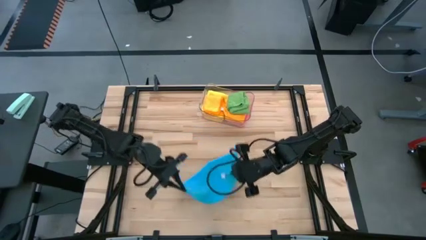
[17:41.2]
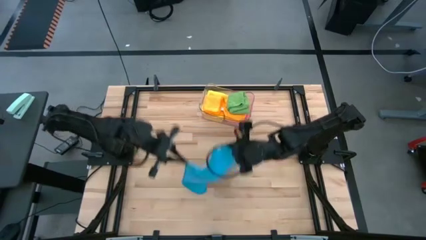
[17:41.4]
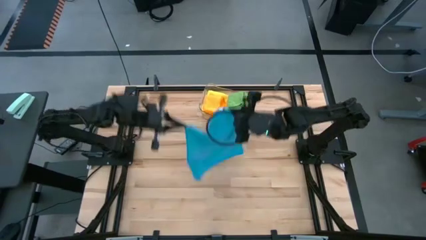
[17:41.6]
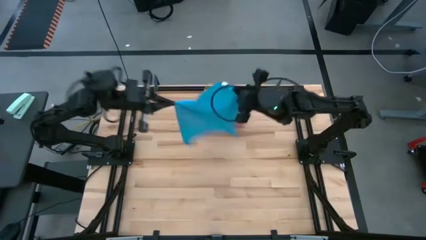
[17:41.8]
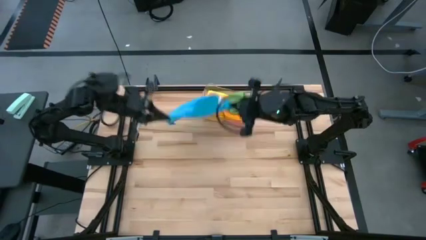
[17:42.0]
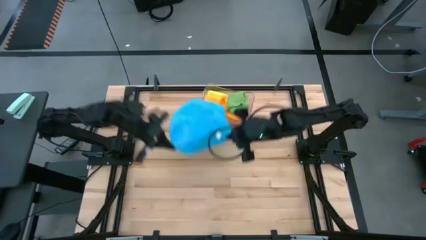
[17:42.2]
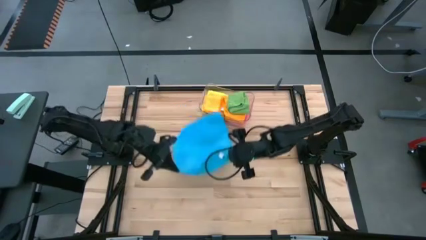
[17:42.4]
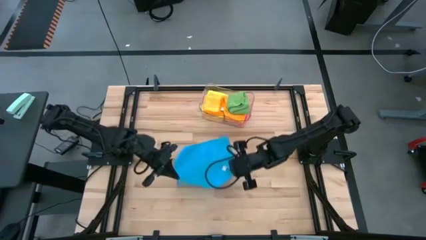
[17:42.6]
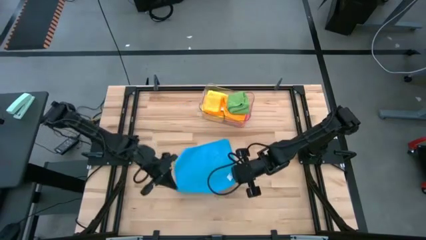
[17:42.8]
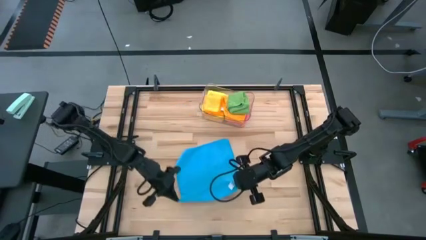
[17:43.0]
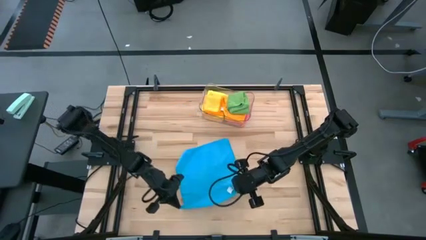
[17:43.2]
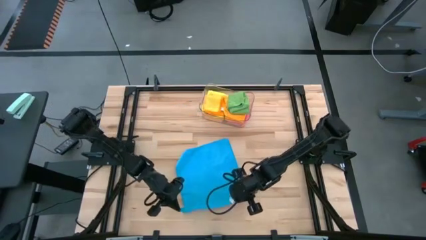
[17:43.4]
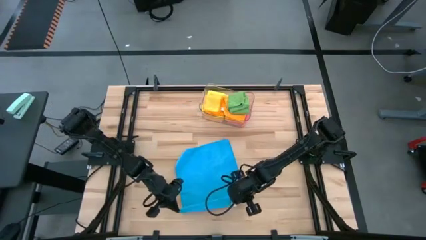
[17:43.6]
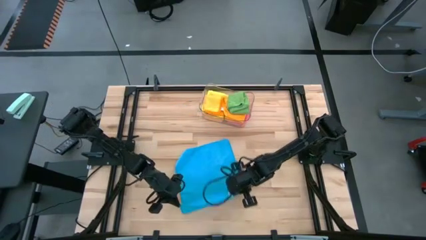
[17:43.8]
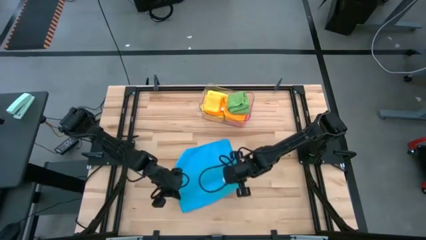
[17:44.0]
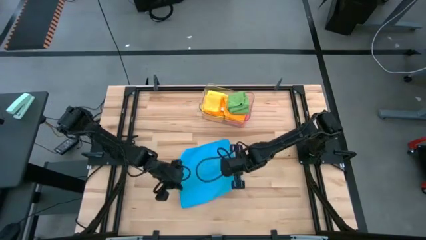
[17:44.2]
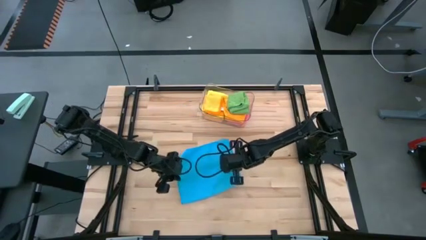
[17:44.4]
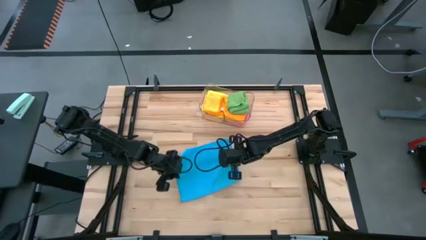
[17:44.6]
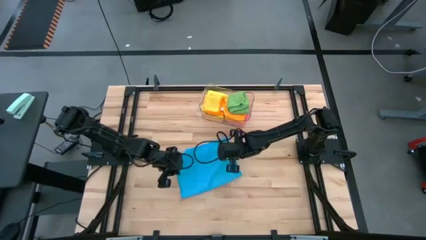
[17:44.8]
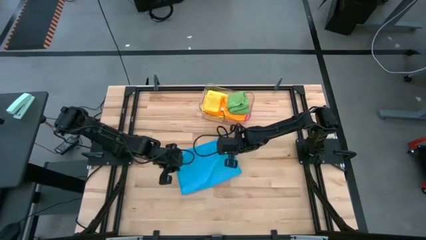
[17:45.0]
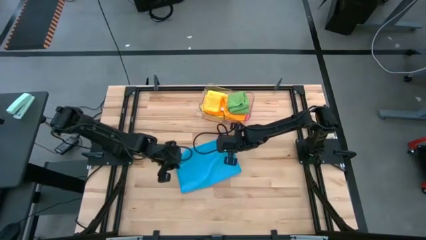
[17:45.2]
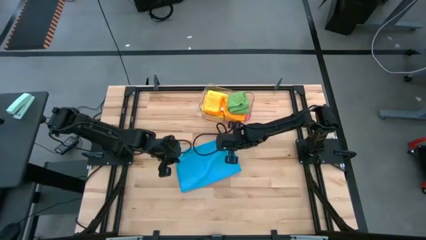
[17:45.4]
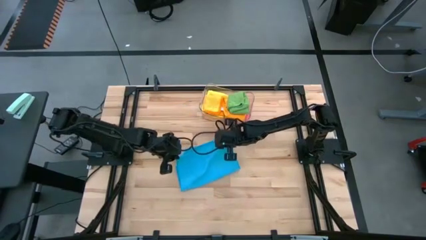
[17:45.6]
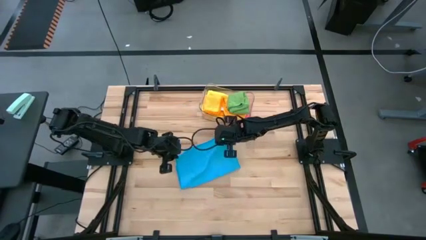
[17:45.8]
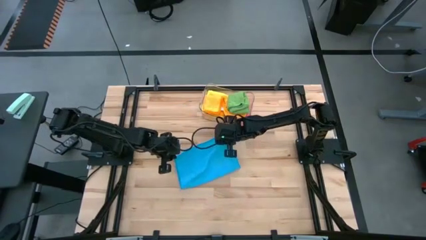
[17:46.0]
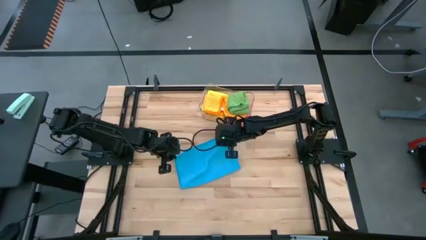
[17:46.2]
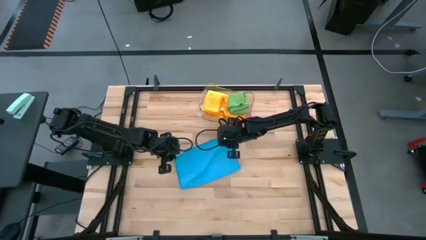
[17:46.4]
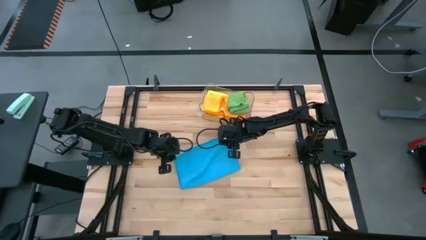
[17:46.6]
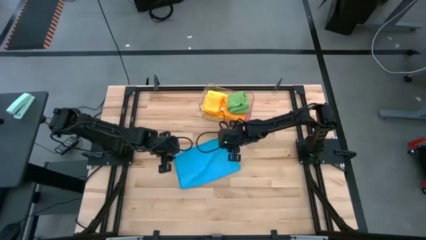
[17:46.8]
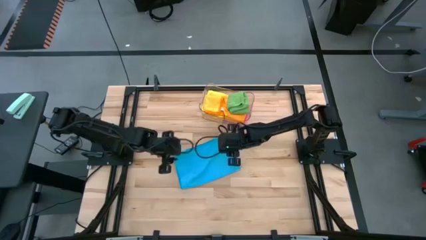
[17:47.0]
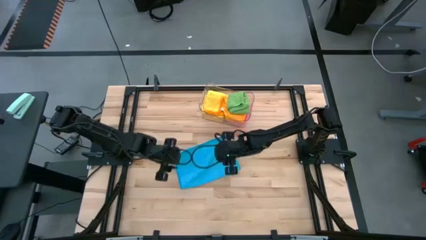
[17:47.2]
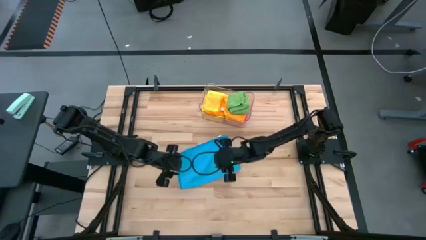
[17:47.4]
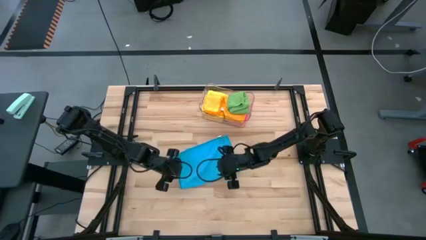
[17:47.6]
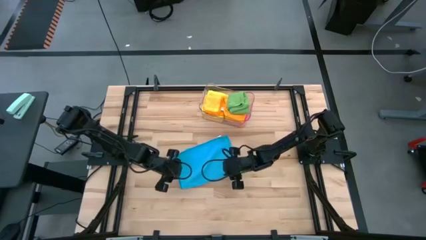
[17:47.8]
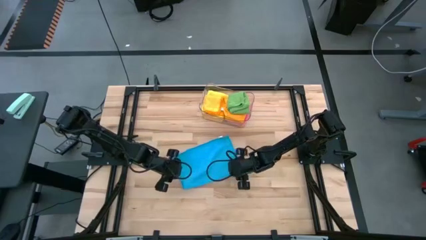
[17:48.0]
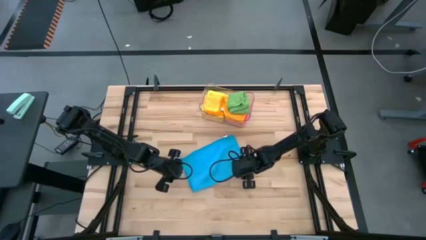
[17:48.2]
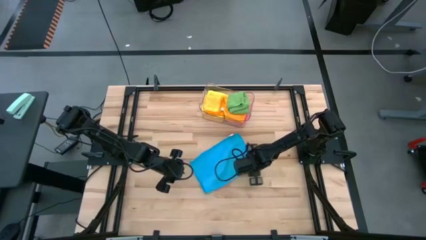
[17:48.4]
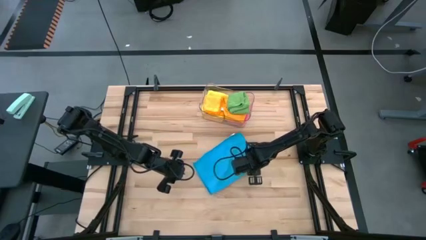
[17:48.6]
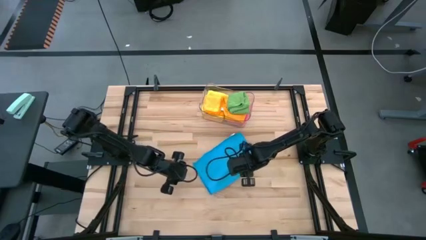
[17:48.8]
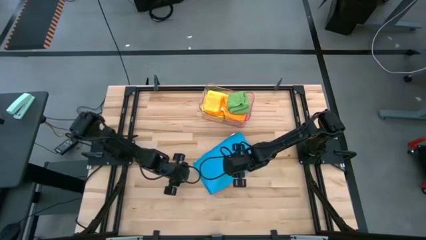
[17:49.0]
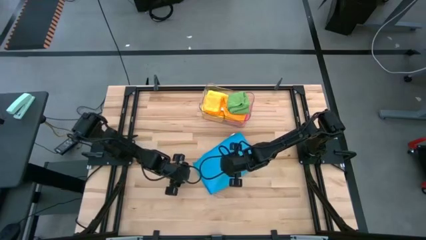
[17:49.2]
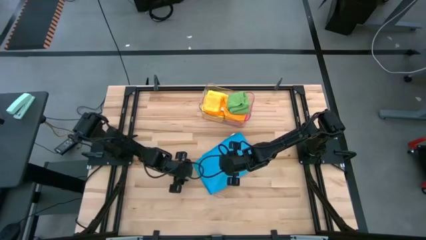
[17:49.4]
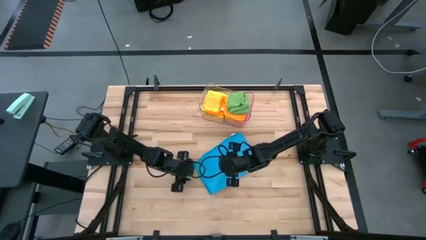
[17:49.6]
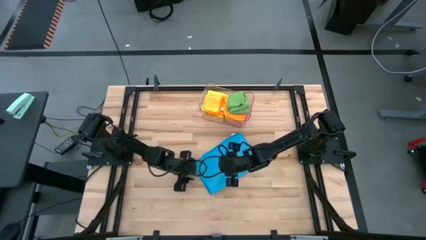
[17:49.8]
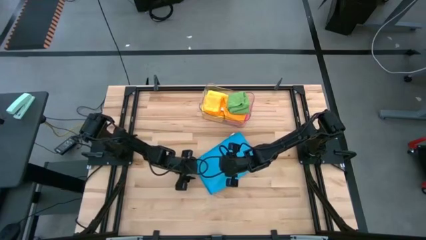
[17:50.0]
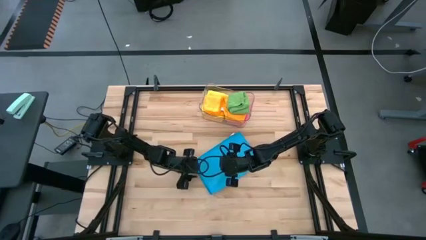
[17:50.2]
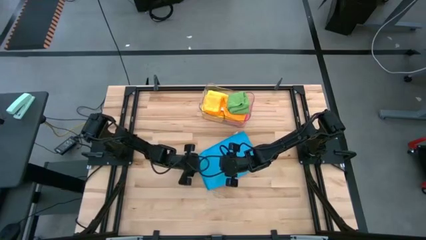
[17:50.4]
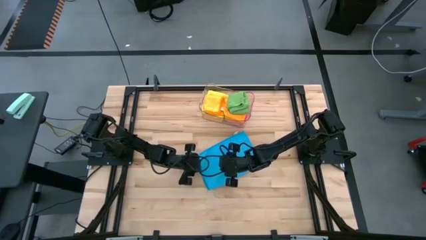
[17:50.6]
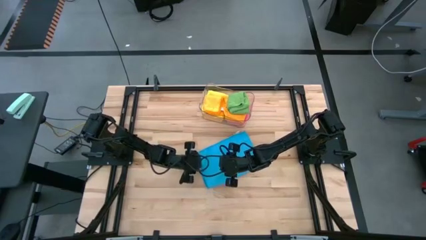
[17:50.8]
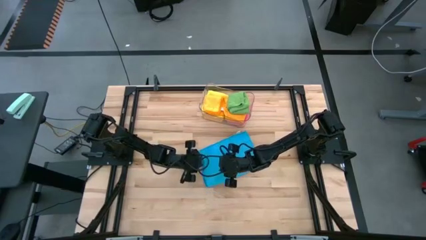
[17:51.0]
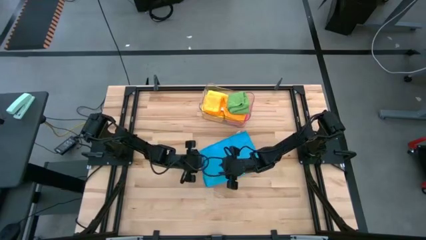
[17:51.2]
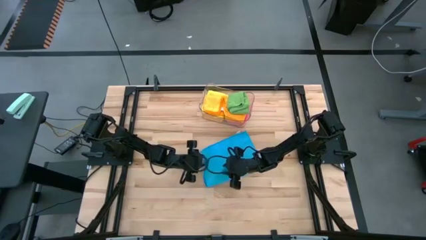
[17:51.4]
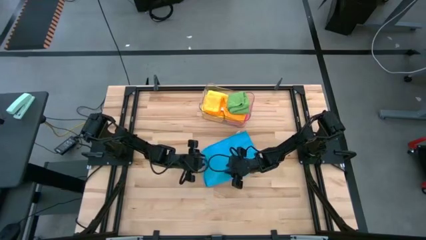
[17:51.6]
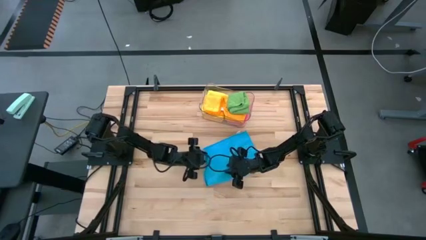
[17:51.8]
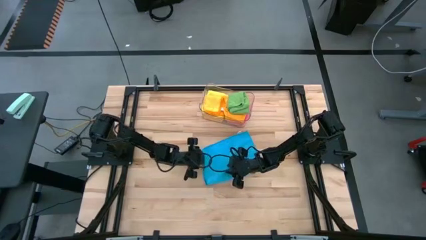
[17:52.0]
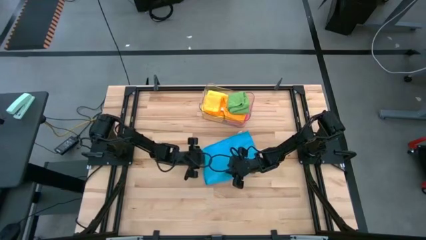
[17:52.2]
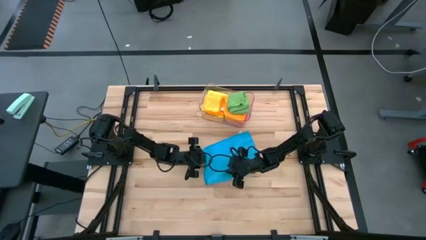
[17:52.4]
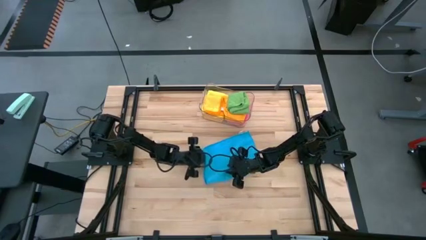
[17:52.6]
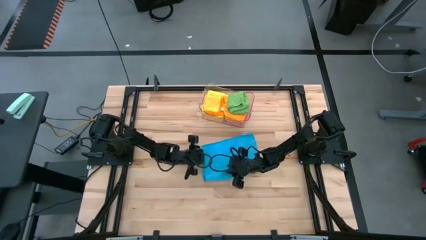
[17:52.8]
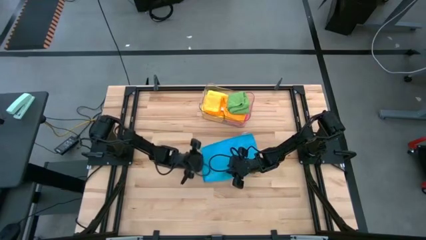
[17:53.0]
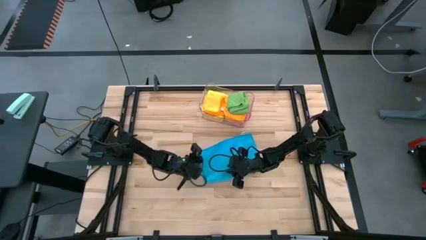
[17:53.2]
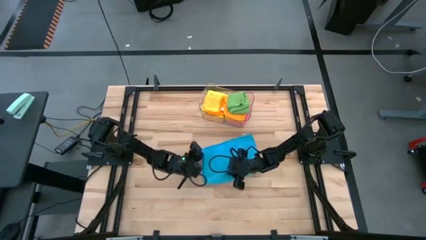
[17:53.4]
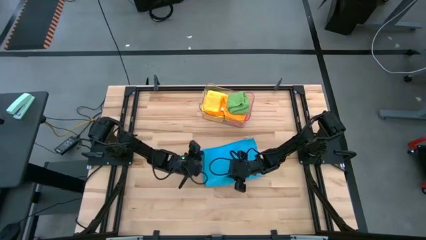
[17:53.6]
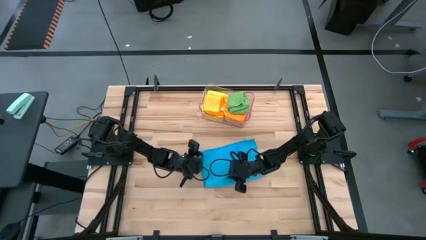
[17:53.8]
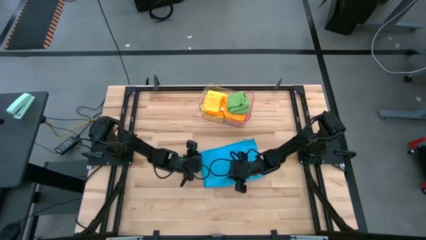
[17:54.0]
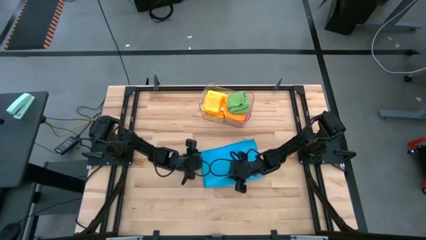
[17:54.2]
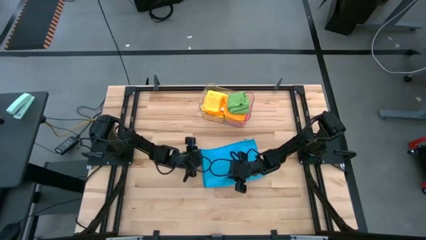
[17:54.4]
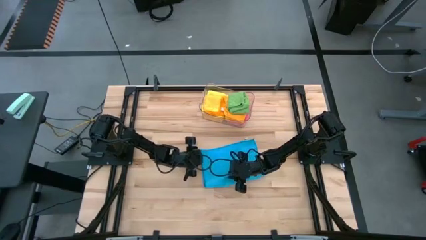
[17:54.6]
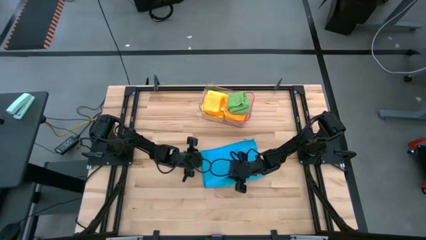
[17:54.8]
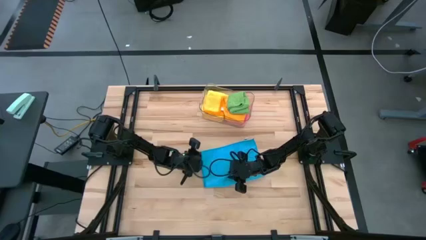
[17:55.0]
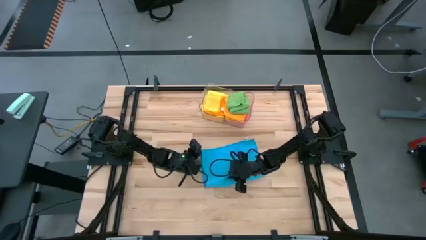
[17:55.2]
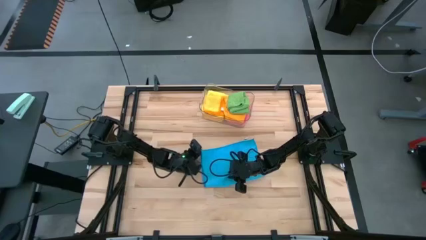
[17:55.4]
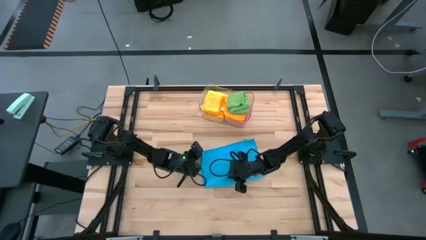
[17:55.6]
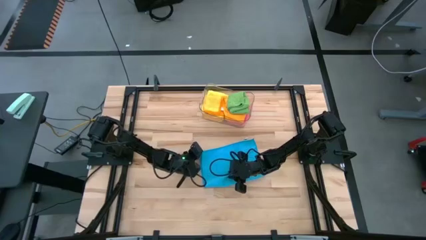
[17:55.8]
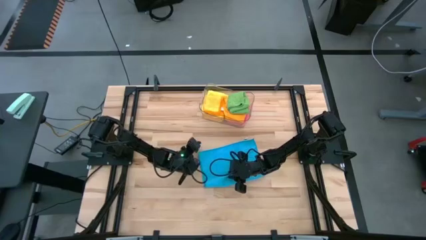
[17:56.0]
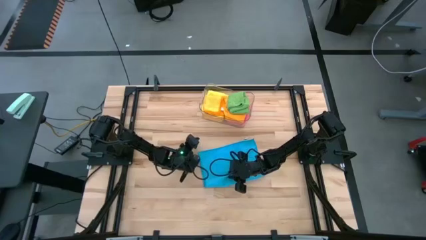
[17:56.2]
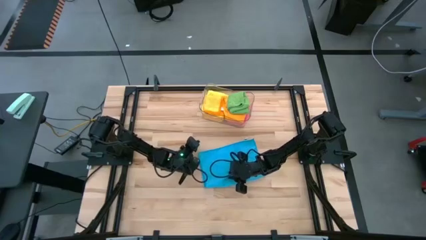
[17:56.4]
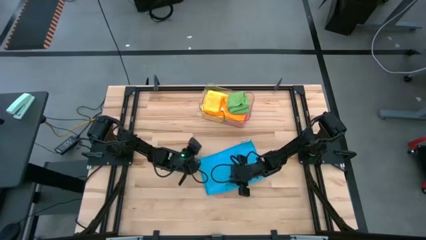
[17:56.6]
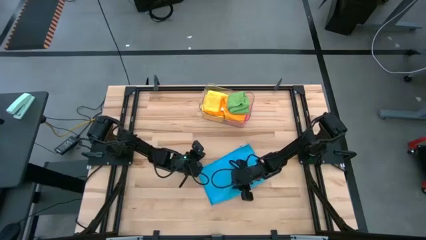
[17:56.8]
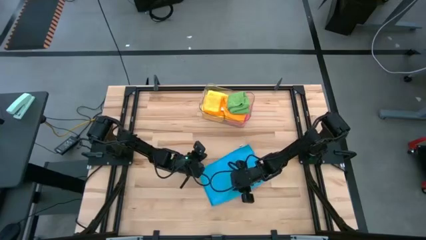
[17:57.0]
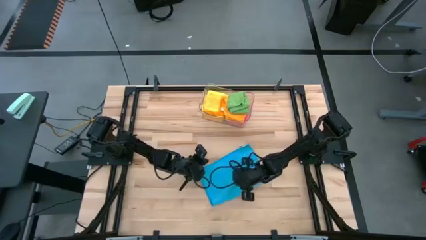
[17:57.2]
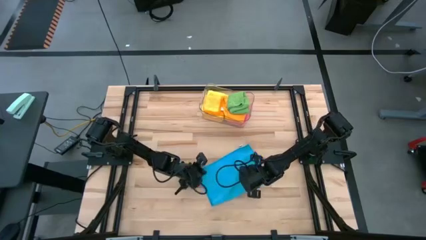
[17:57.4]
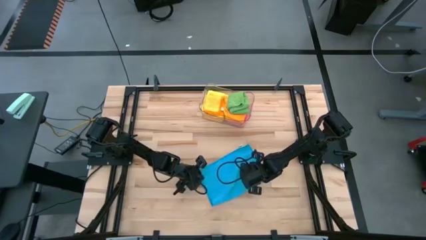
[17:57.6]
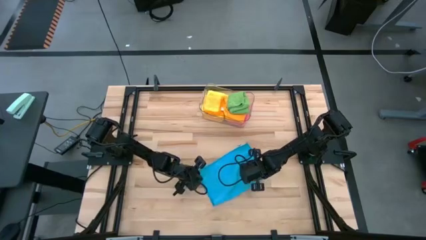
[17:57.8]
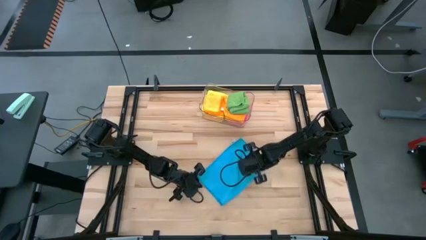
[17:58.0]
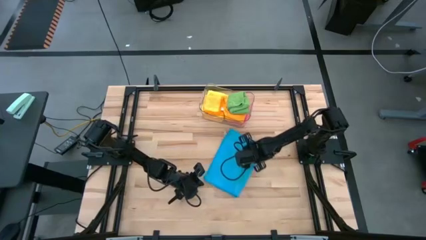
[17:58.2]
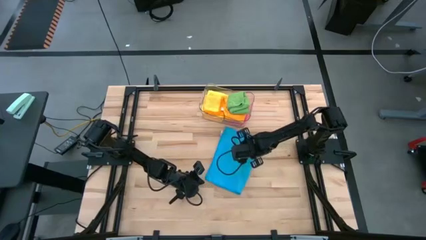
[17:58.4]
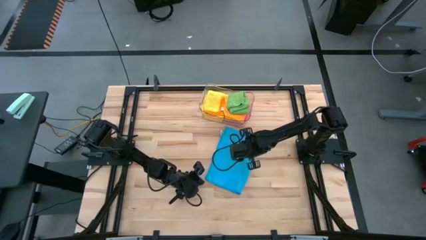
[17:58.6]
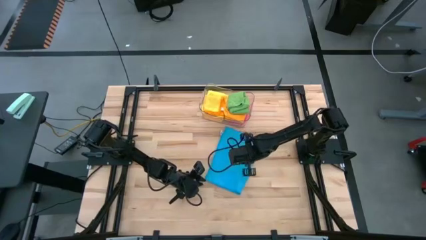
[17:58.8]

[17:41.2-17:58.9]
Task: Fold microfiber towels
Fold the blue microfiber cloth
